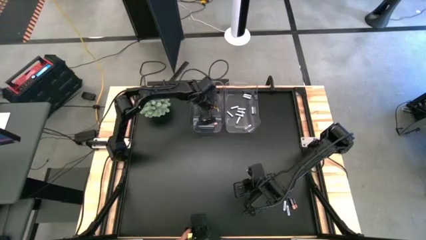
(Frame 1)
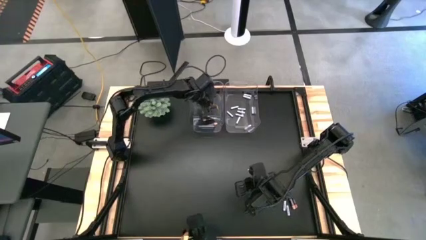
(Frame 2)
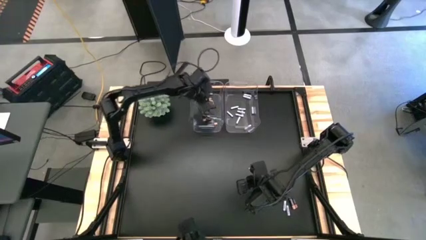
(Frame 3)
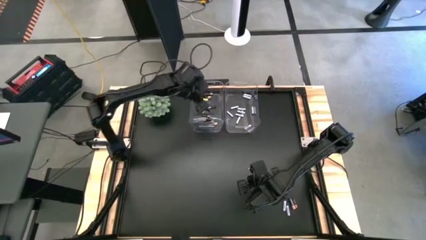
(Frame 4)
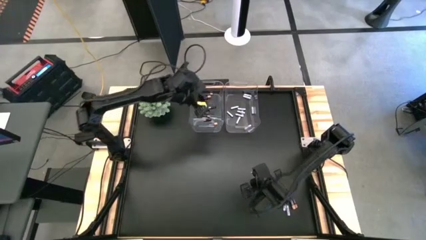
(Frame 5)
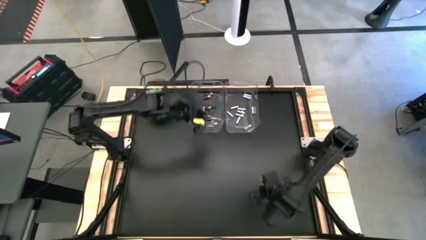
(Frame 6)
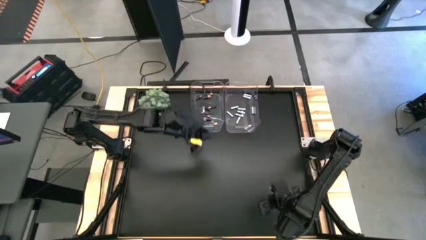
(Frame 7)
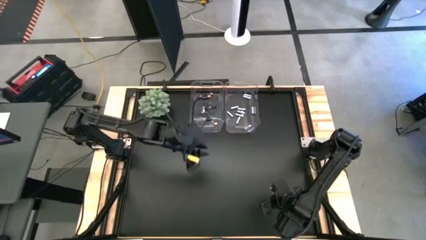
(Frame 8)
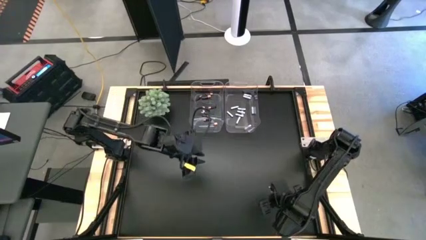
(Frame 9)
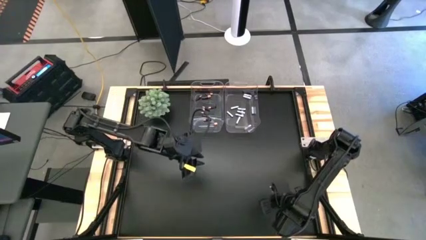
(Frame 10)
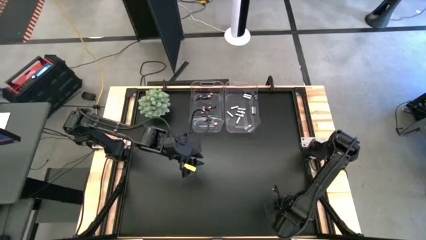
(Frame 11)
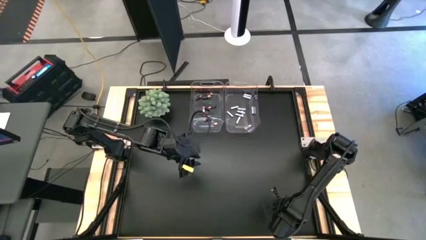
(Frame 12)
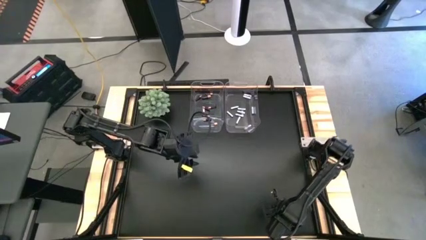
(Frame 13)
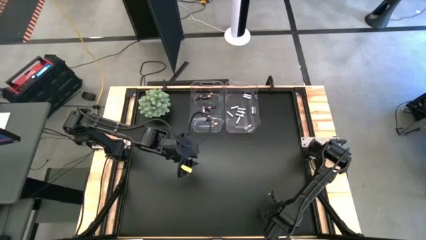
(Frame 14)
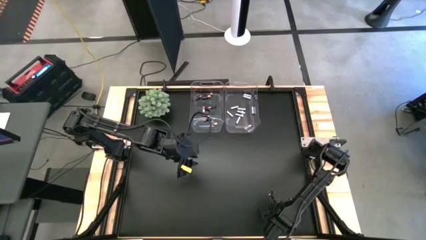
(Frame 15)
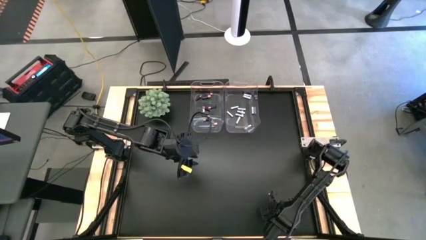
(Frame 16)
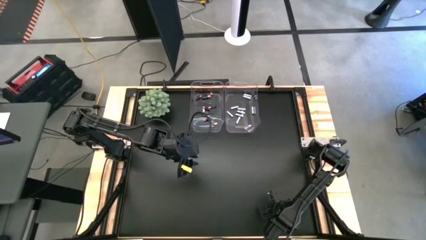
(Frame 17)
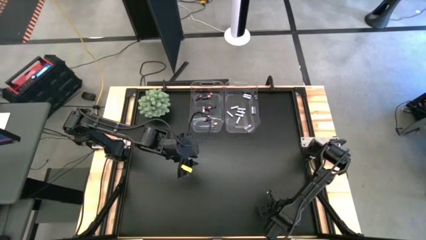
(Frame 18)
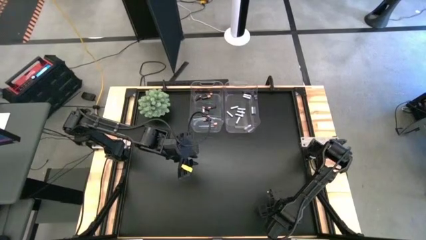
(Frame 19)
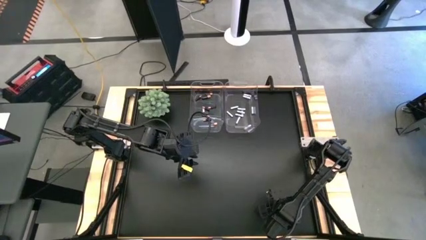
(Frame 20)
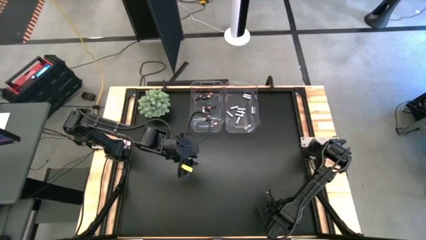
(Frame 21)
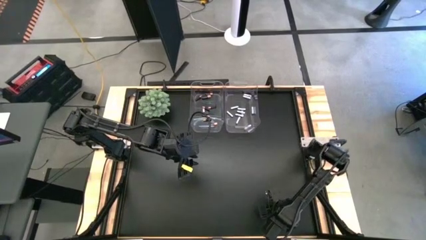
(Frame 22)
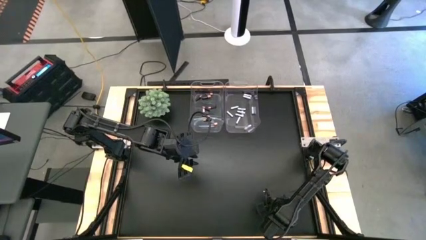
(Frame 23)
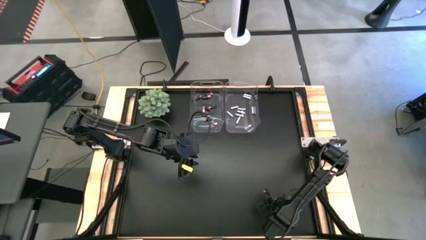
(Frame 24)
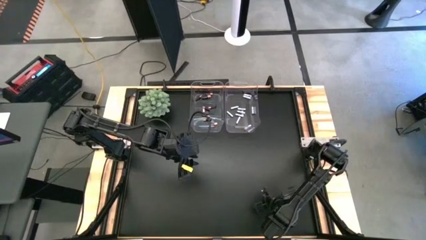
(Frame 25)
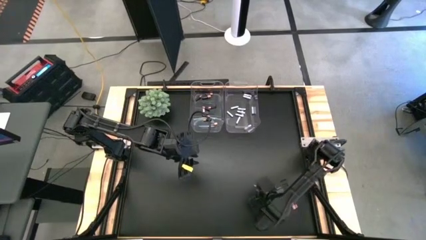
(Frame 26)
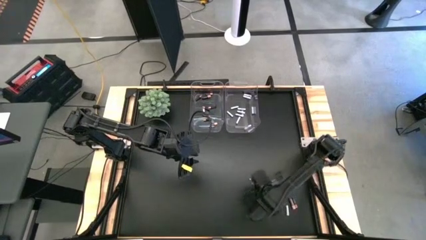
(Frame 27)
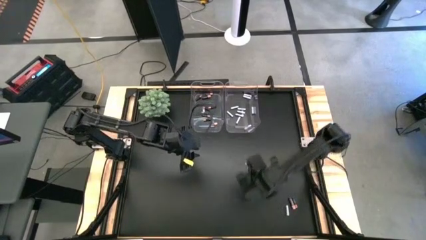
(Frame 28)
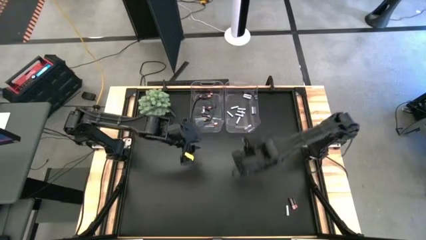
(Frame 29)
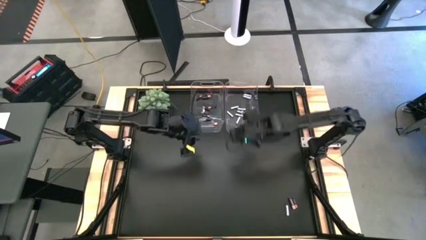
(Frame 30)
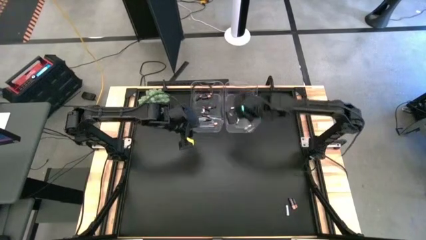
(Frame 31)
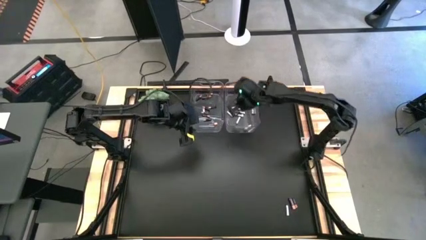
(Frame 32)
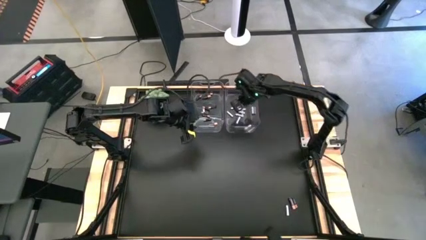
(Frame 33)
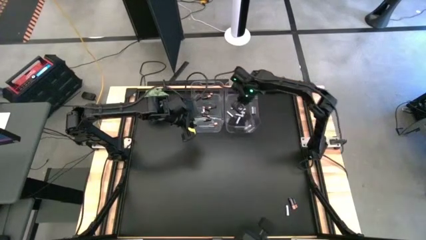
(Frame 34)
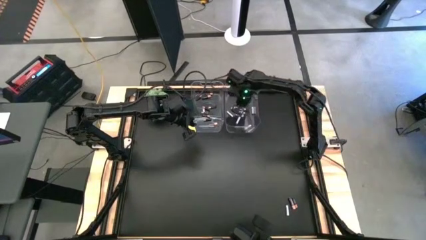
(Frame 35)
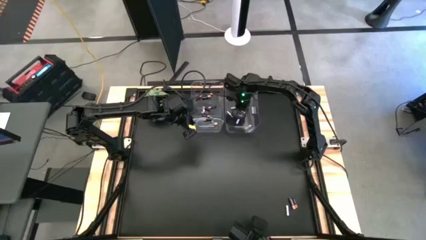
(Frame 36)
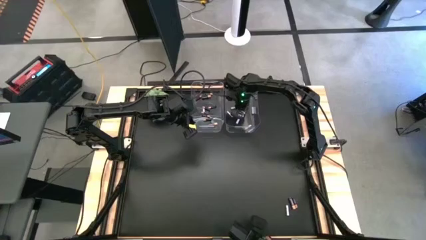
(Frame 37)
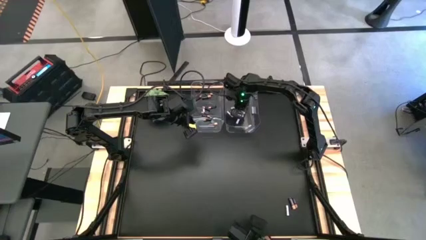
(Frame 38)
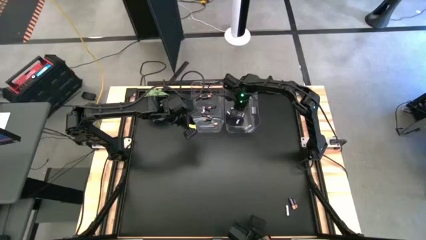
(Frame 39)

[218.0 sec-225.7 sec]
Task: Sort batteries
Put the white battery into the right transparent bin

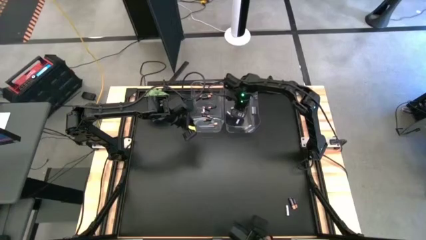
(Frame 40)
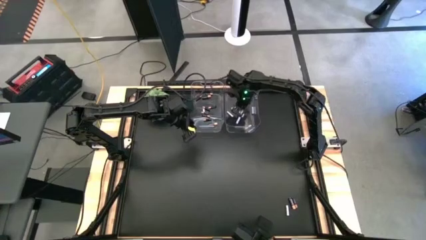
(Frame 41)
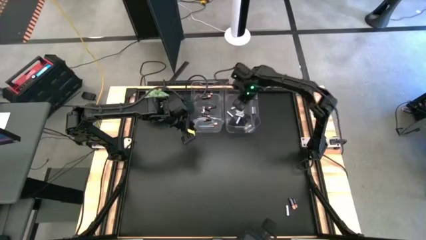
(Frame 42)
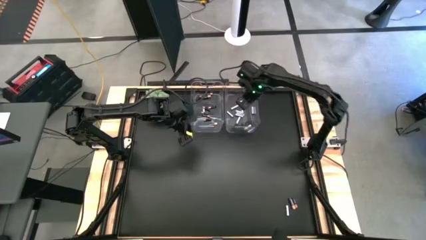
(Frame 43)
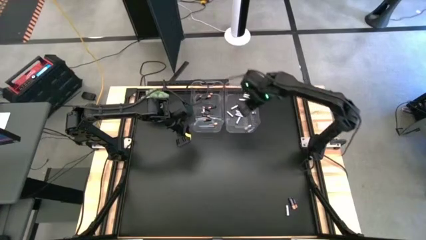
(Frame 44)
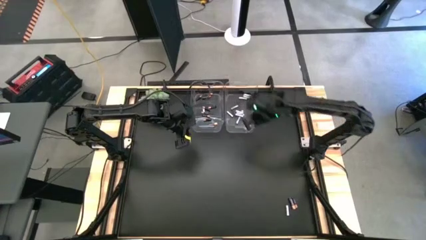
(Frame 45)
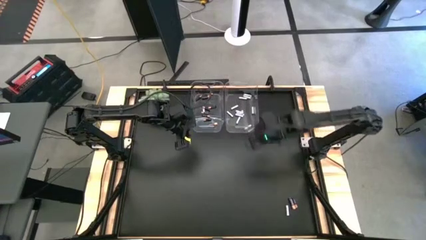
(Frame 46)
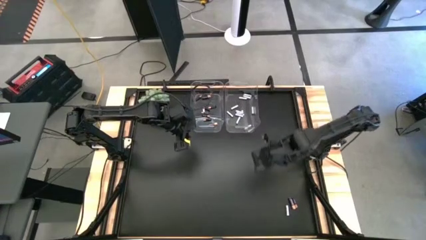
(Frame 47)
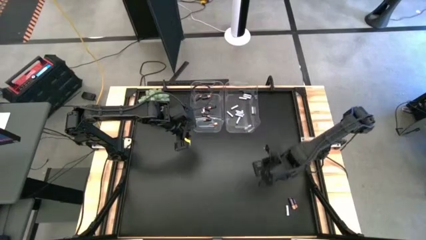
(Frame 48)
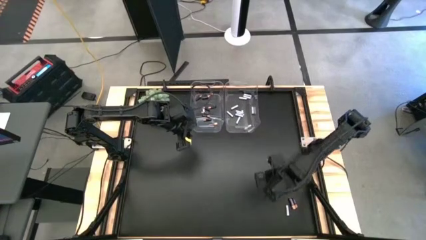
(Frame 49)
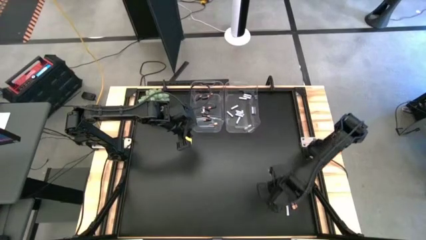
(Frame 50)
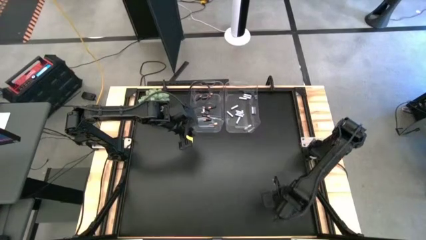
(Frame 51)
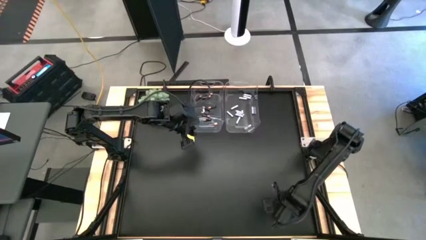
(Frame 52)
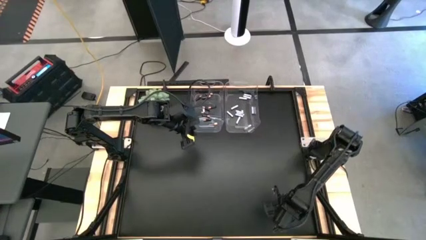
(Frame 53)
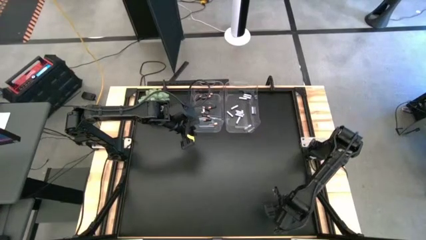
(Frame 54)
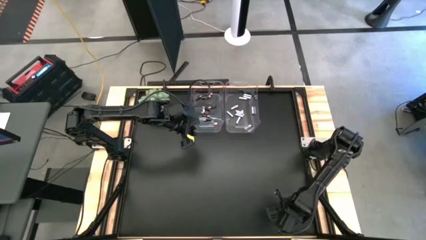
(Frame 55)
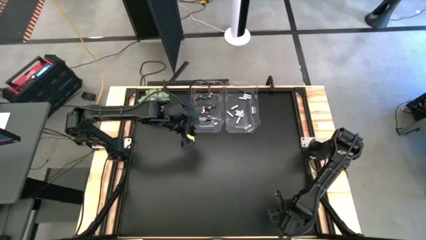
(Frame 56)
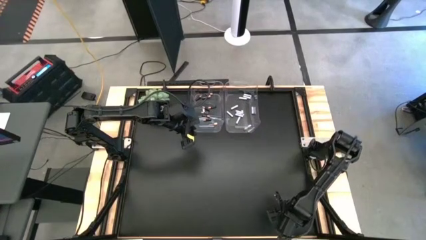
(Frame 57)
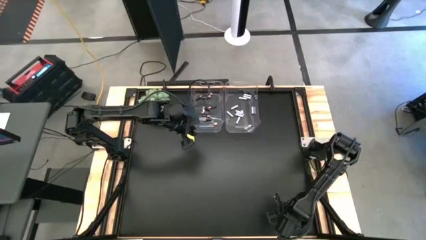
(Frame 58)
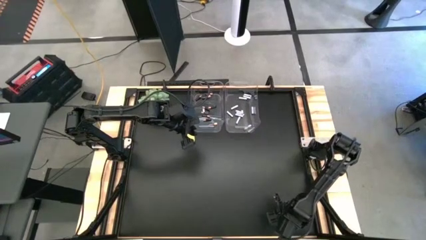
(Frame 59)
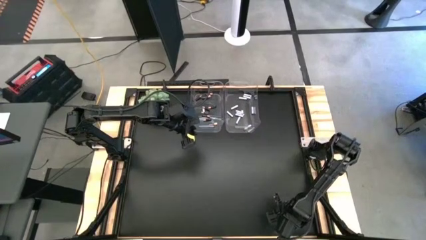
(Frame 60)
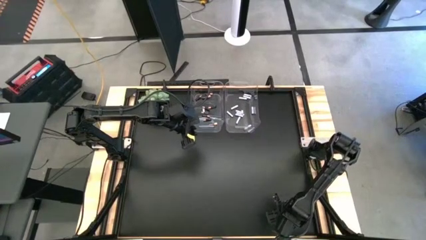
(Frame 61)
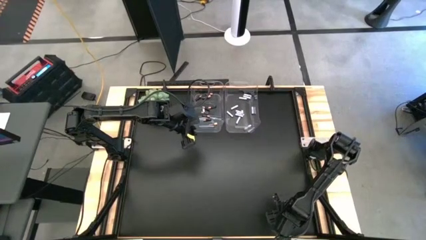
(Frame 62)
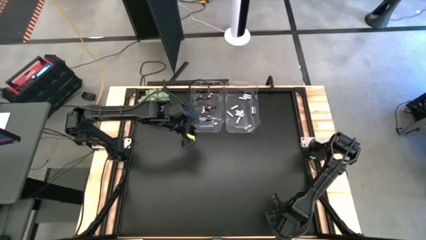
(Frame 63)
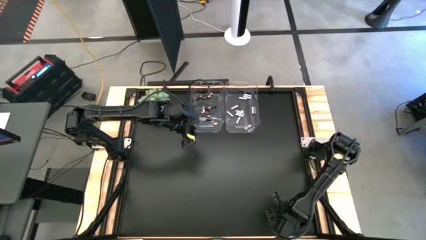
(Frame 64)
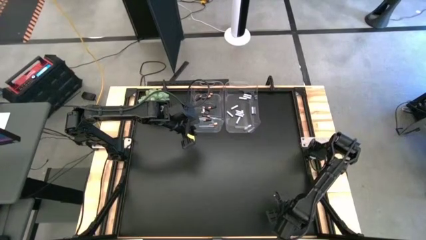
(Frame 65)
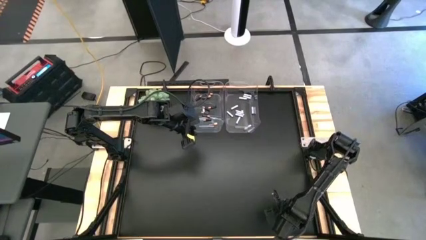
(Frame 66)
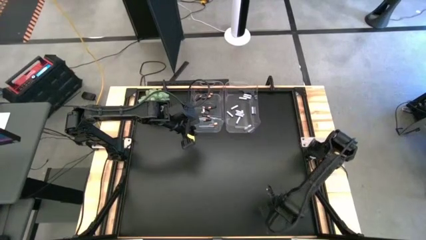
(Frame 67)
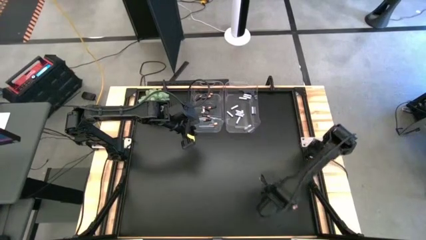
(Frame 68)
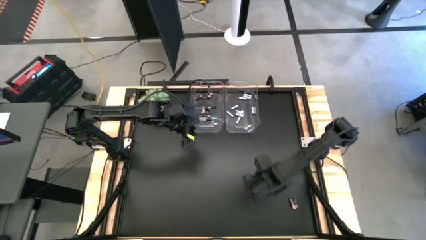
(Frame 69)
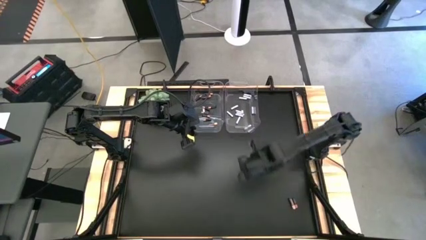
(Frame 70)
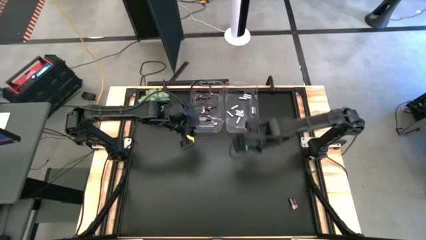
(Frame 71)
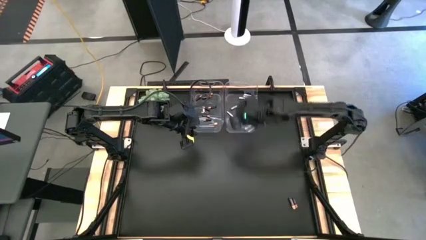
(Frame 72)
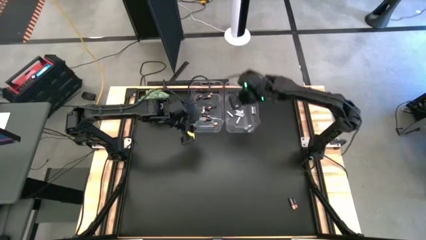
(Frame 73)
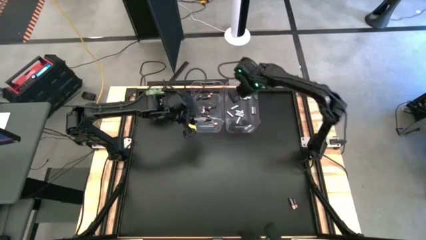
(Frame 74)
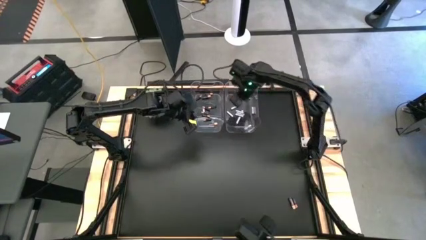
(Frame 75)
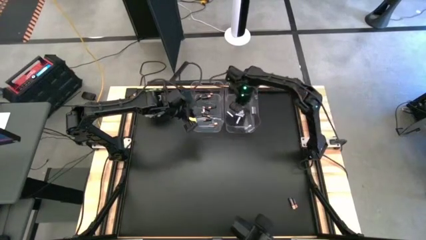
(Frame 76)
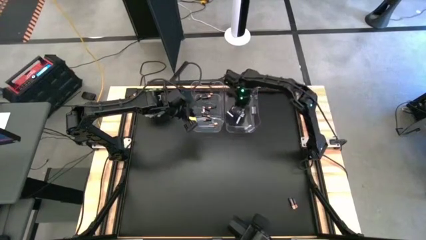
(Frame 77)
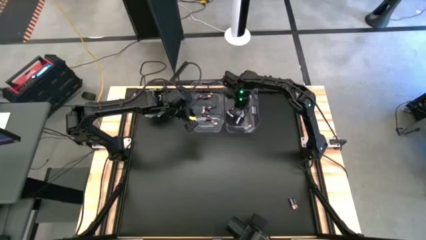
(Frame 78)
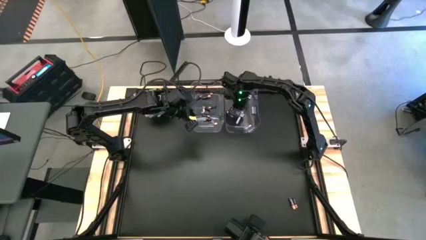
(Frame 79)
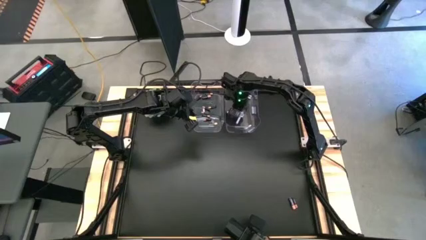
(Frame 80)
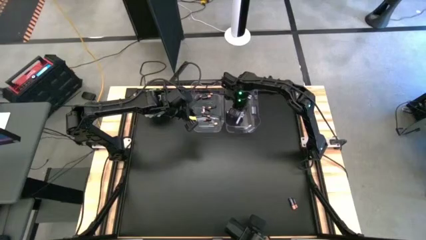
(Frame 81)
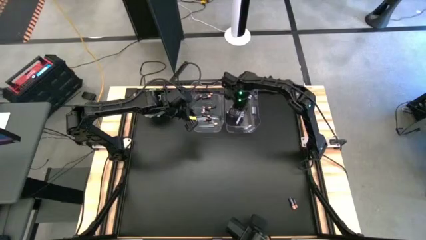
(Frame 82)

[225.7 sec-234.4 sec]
Put the white battery into the right transparent bin
